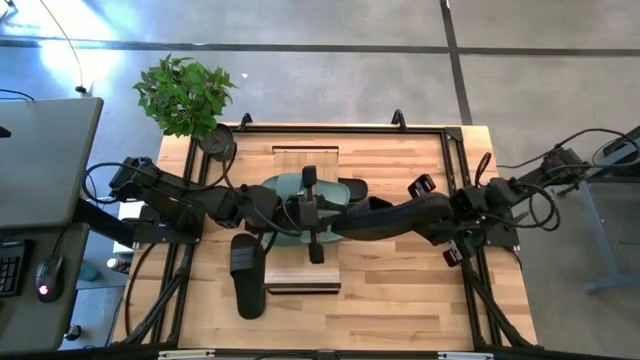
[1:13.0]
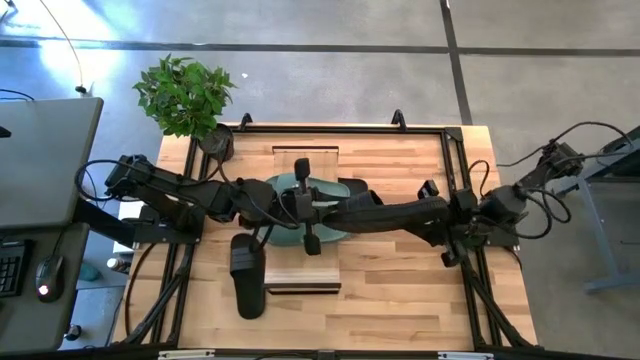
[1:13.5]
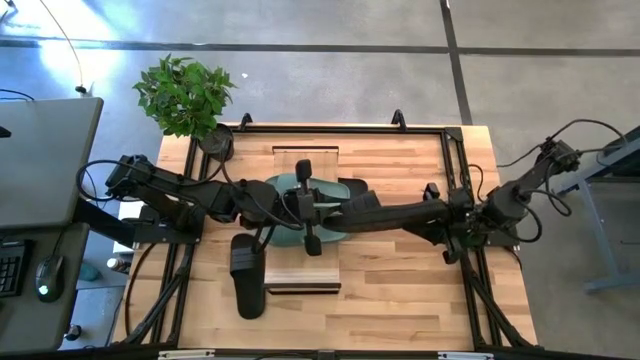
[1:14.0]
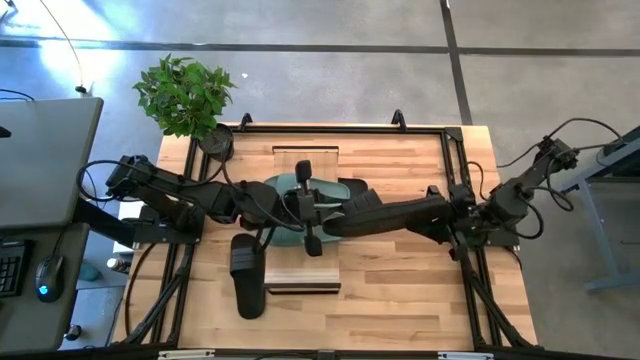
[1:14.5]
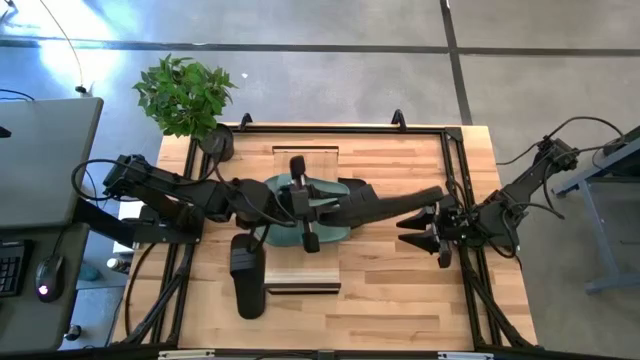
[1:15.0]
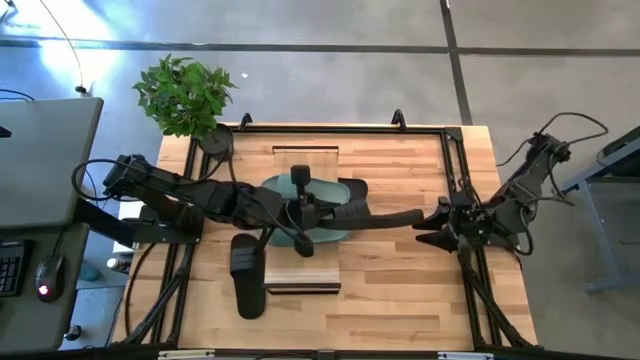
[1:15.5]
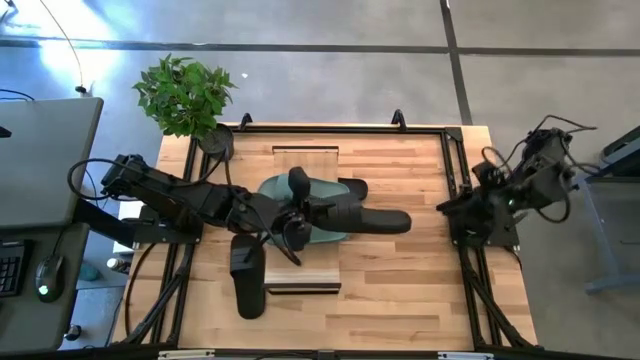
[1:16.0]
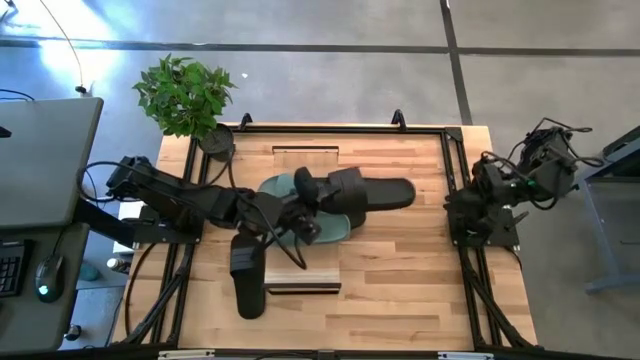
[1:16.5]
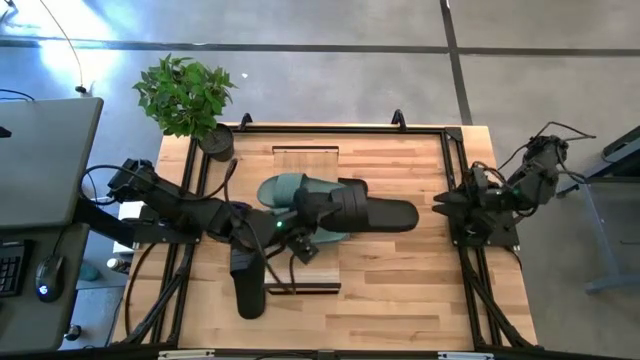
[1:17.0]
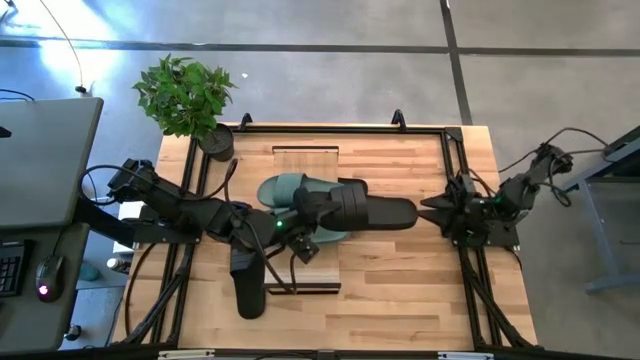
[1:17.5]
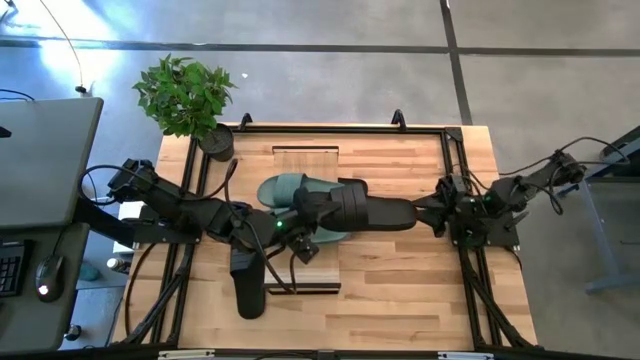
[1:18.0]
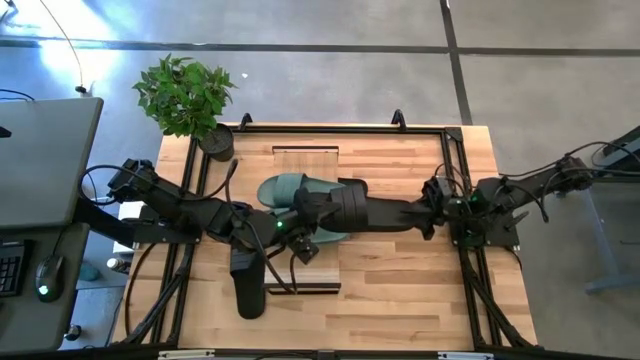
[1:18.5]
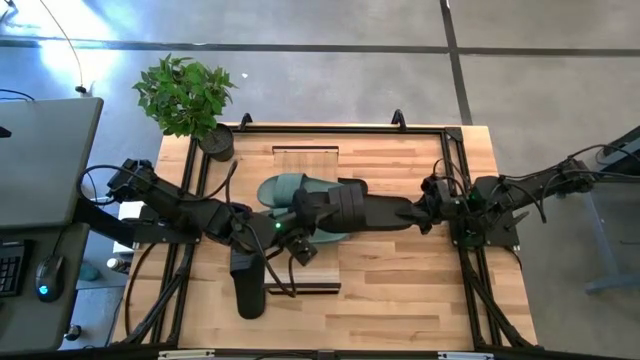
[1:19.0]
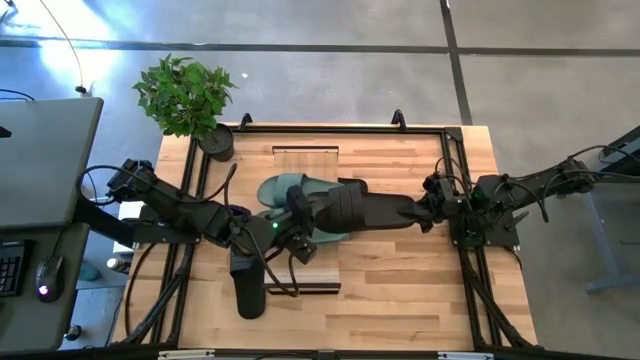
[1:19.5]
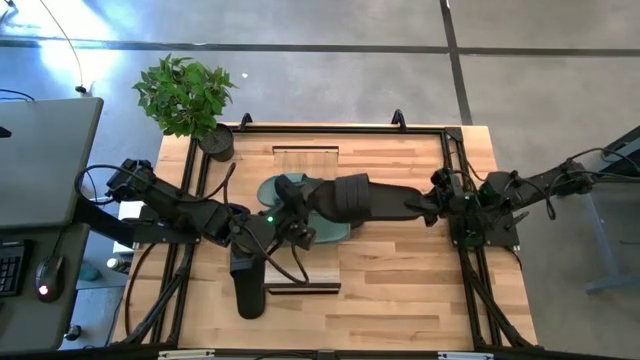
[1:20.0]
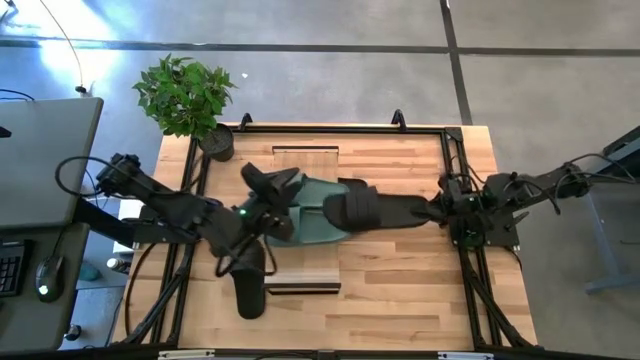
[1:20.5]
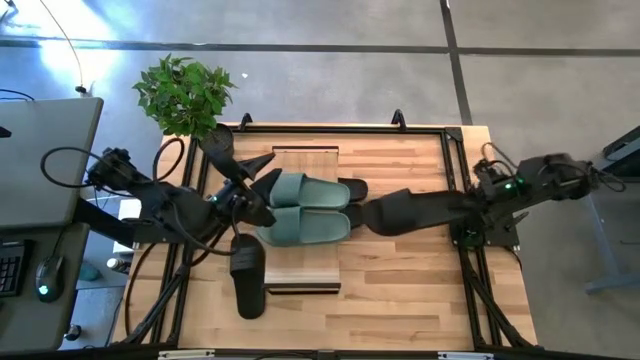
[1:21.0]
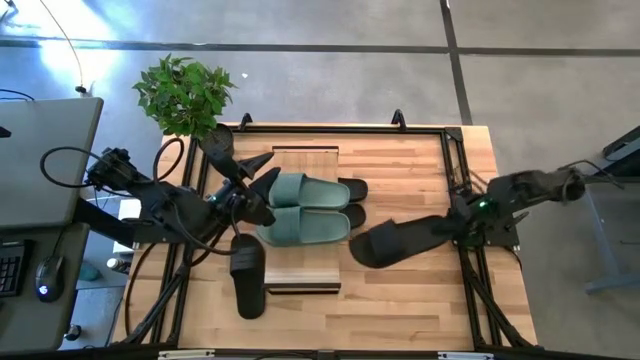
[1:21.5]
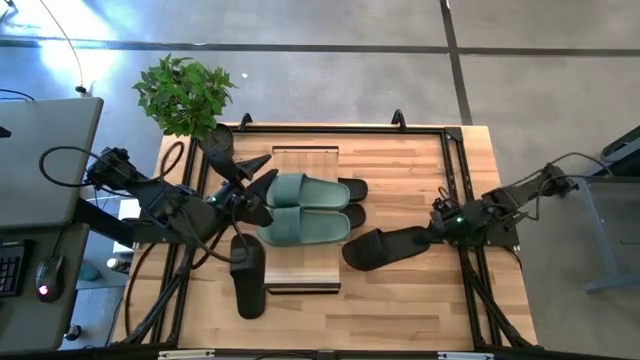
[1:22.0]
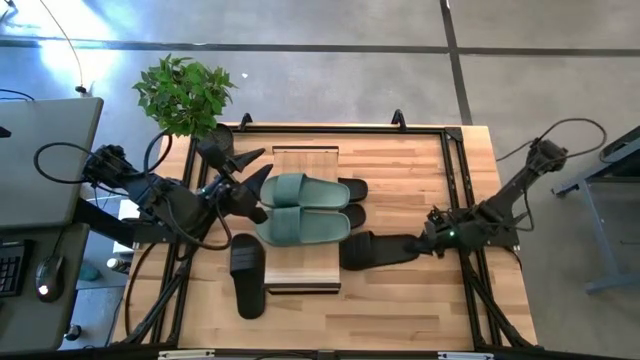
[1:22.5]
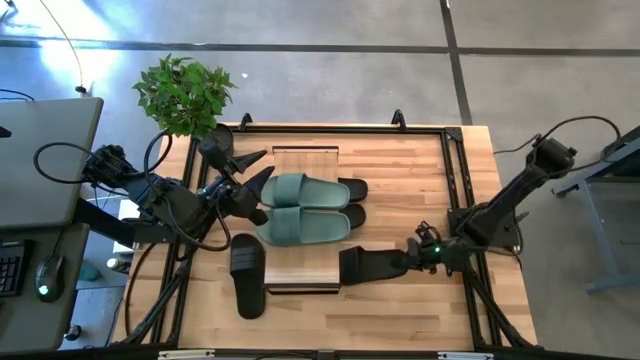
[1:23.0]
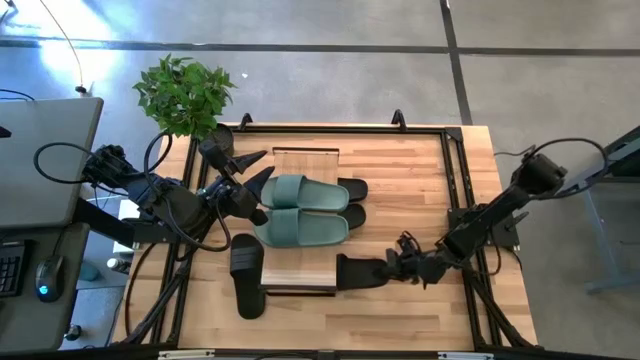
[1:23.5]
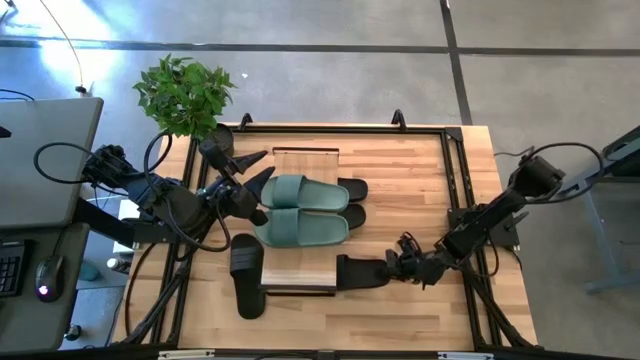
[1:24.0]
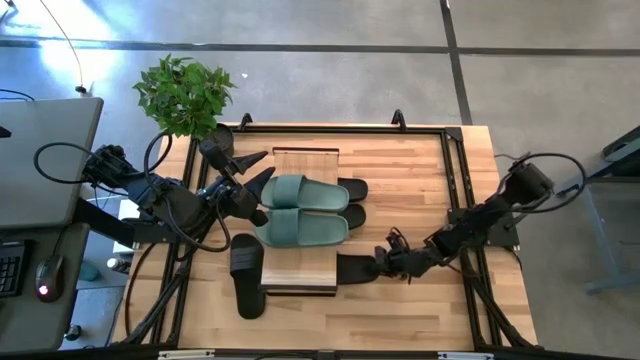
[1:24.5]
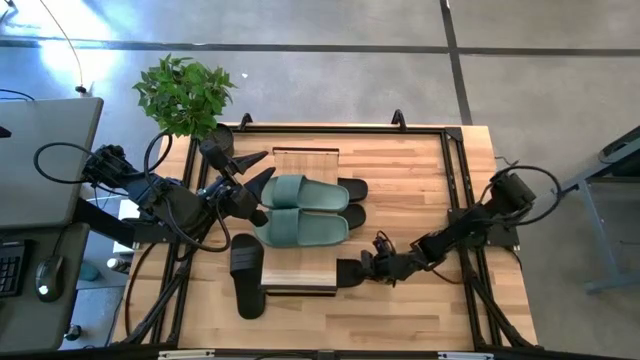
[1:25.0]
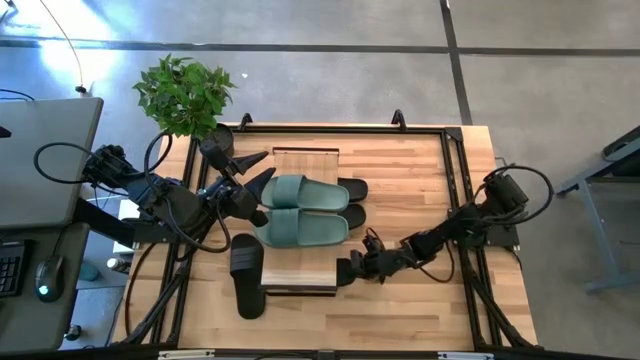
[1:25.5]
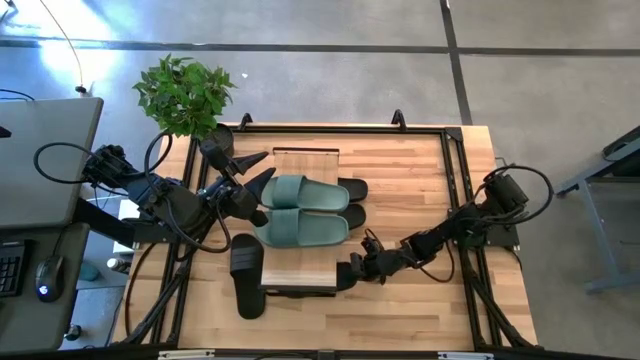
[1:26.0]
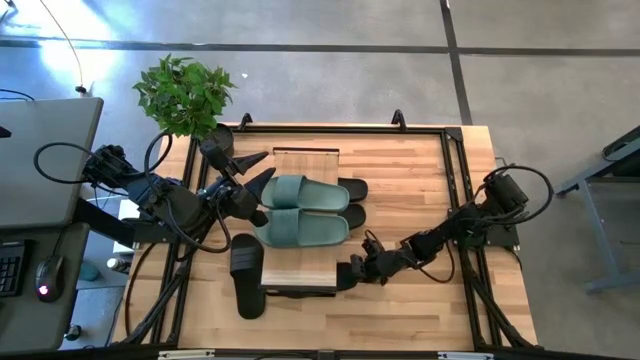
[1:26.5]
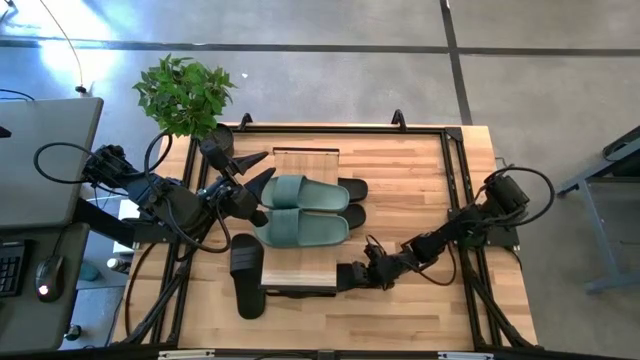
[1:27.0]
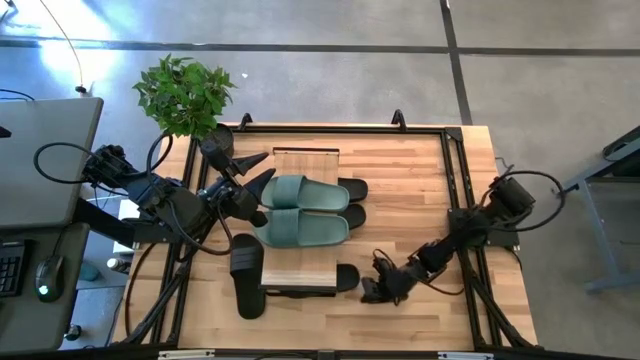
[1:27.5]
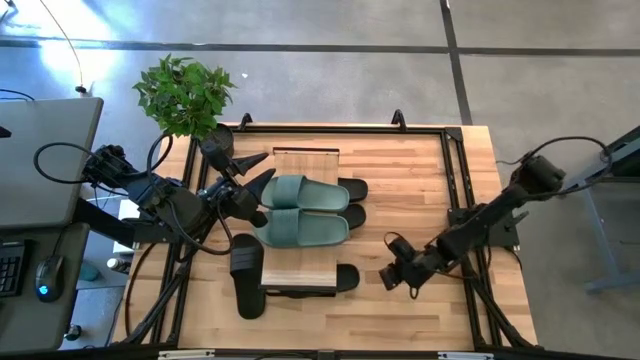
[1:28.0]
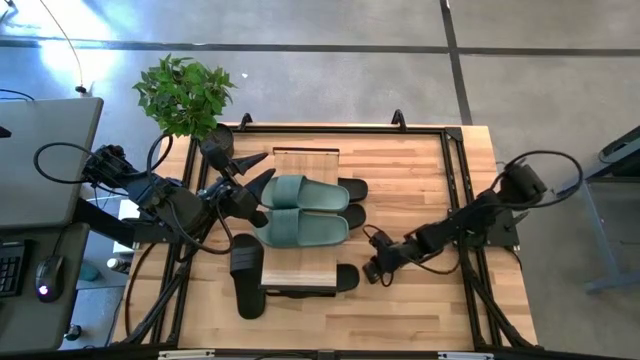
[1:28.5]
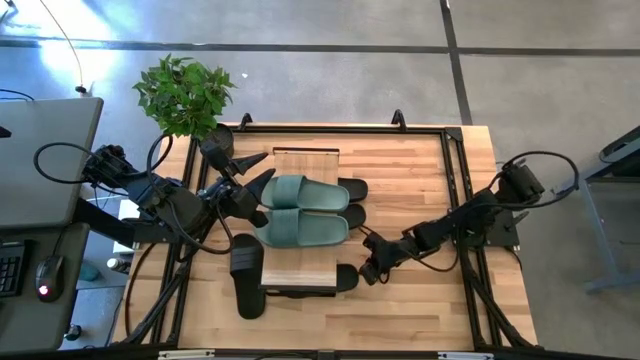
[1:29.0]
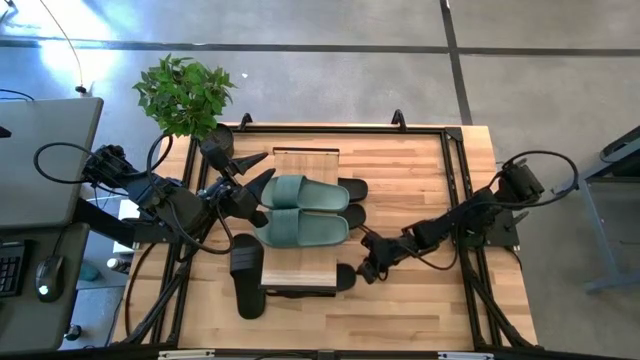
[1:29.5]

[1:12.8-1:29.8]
Task: Pick and place slides into the shelf
Put the black slipper under the shelf

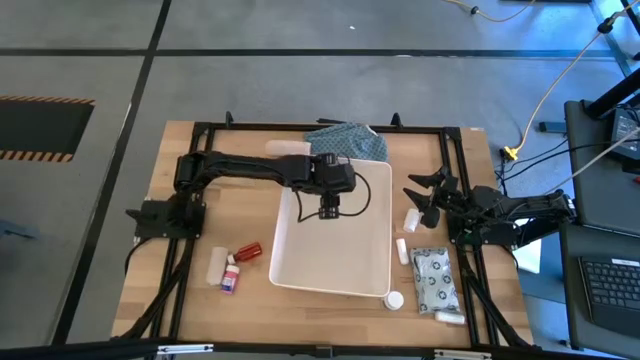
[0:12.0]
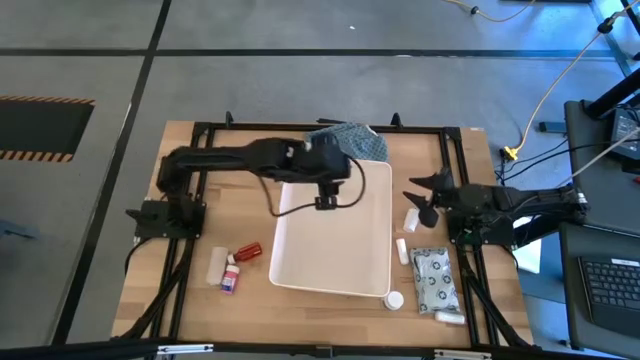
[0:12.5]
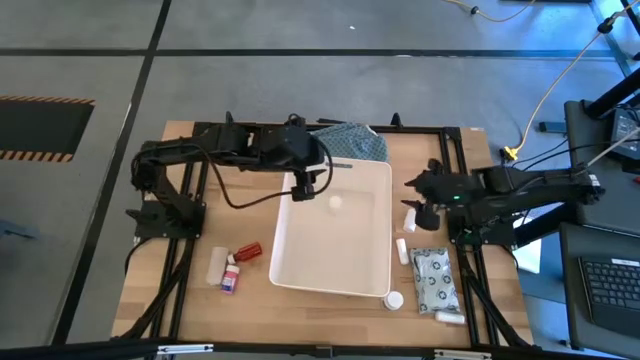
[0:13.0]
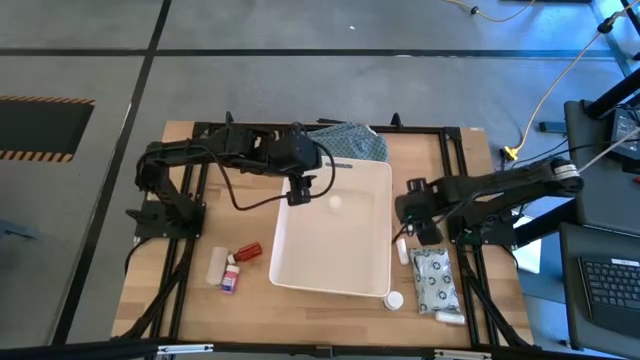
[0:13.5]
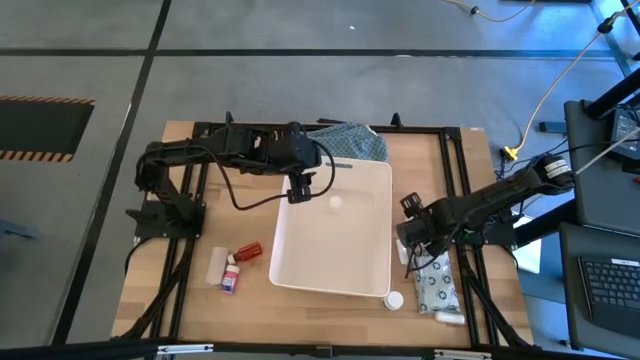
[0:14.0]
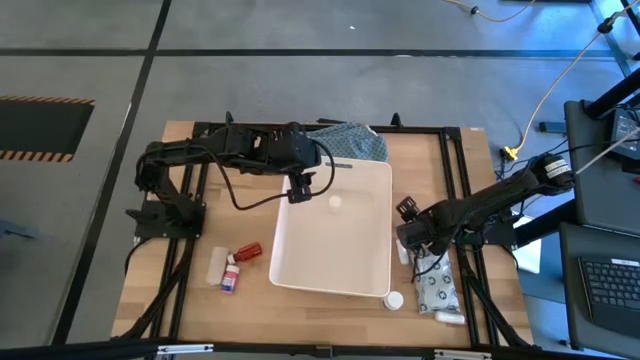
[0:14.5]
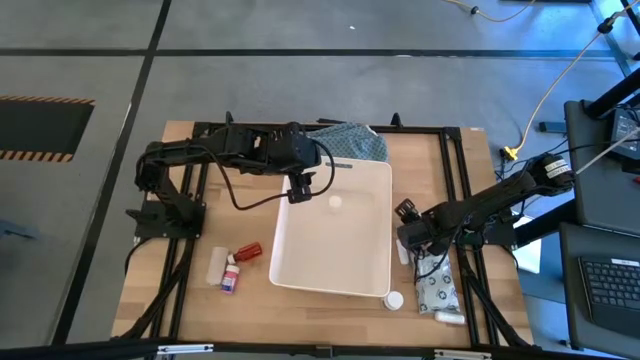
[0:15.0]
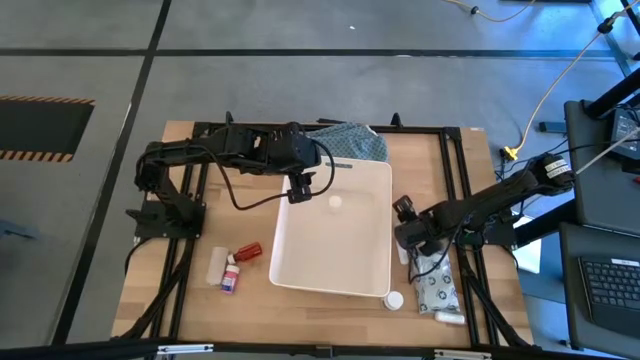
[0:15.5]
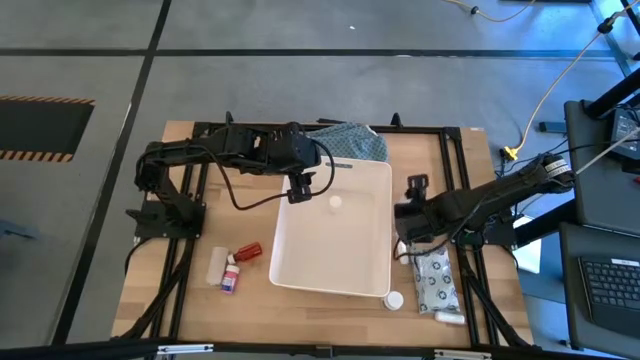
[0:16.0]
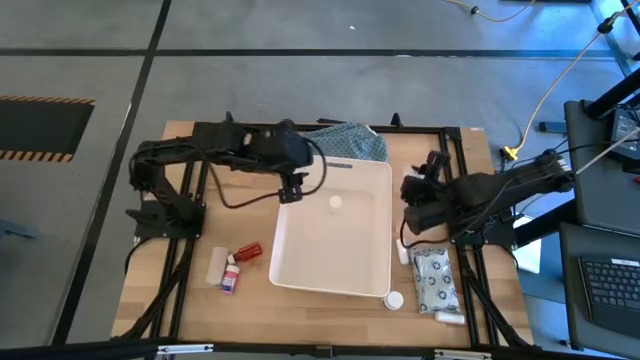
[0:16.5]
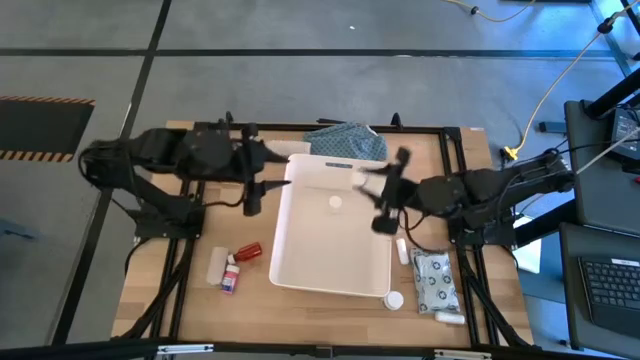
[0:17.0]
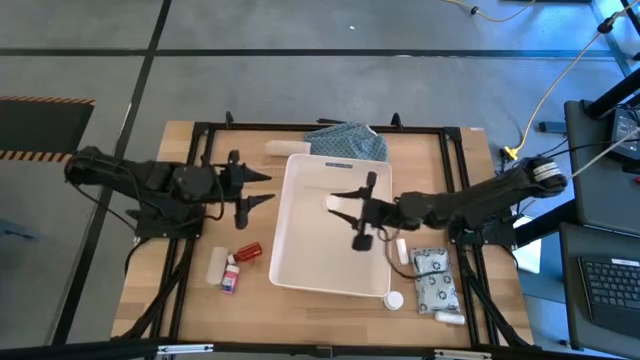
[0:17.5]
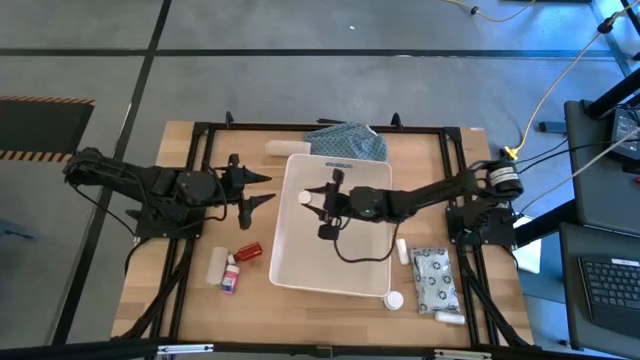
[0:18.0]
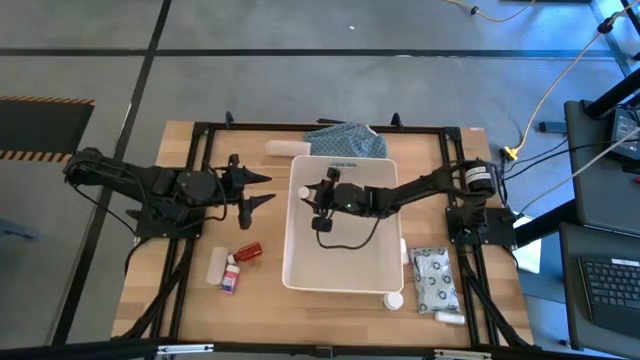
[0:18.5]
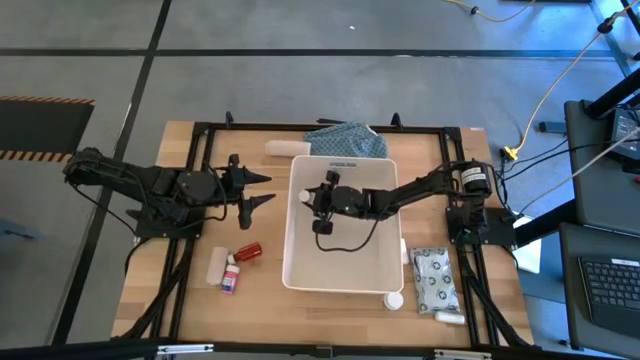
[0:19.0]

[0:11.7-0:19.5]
Task: Pick & place medical supplies in basket/bin
Put the top white pill bottle into the white bin
